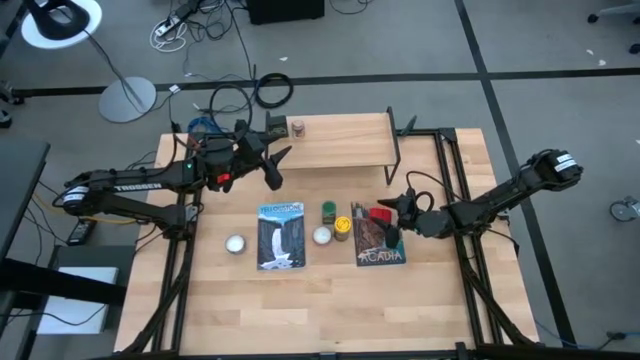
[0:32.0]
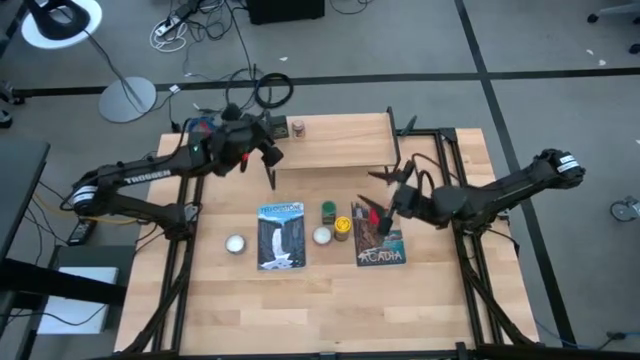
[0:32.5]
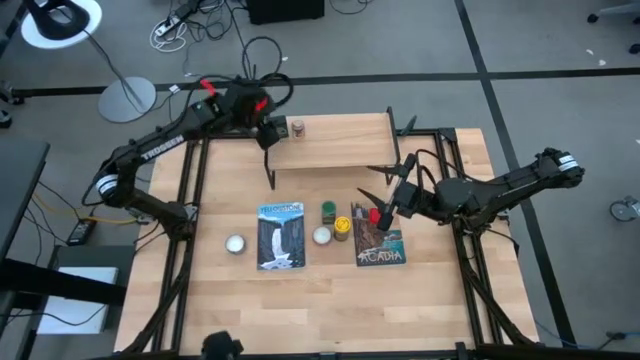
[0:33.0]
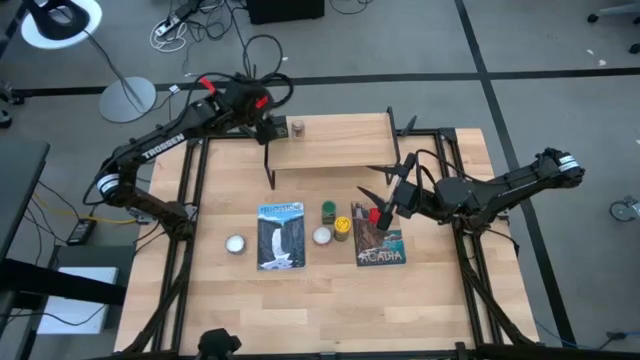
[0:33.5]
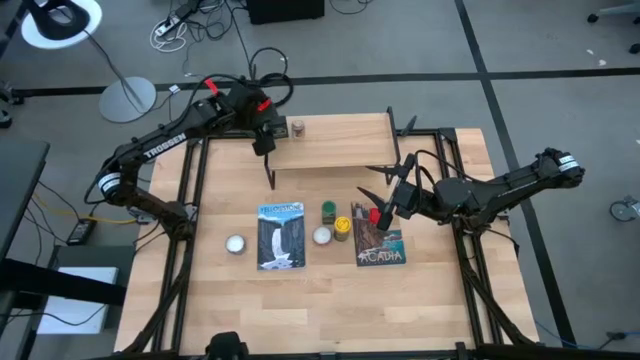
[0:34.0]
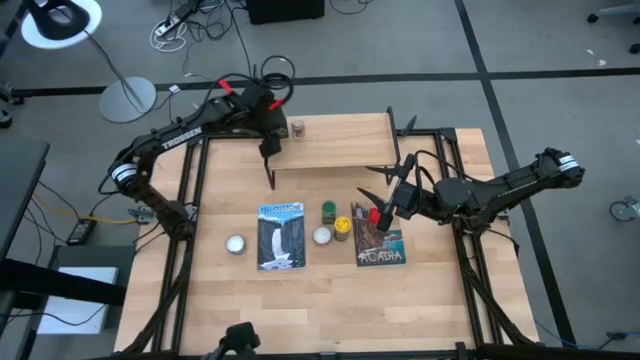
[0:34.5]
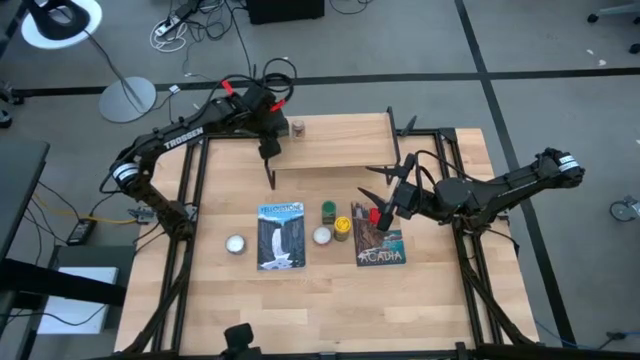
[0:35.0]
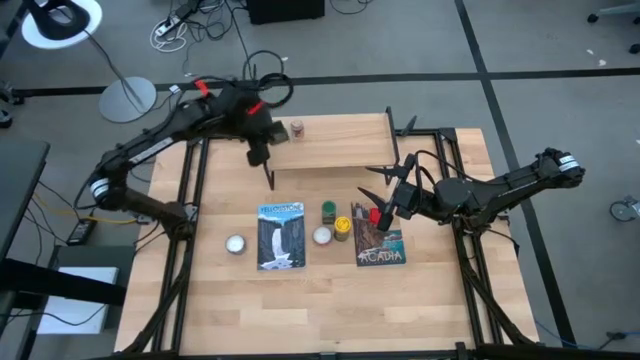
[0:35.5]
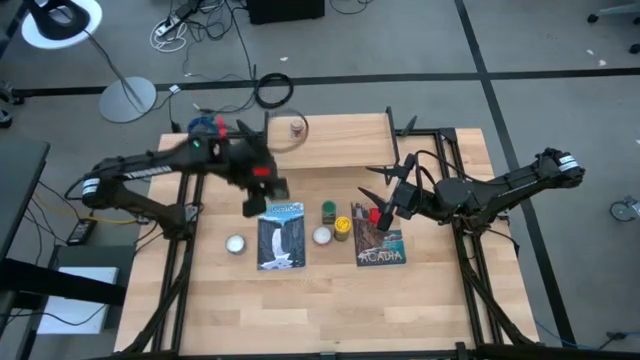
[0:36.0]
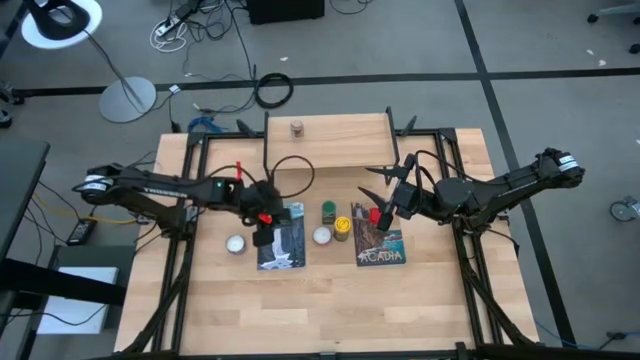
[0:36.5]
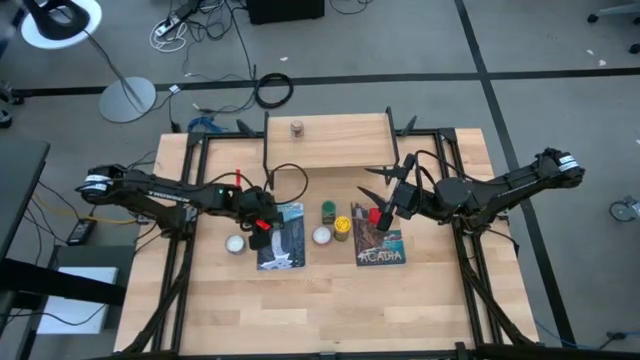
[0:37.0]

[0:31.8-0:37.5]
Task: Shelf spices
Remove the black spice from the shelf

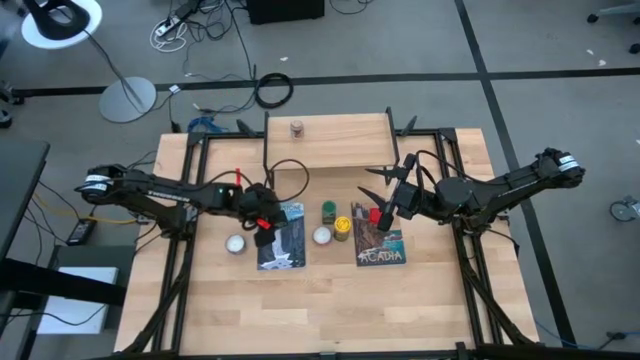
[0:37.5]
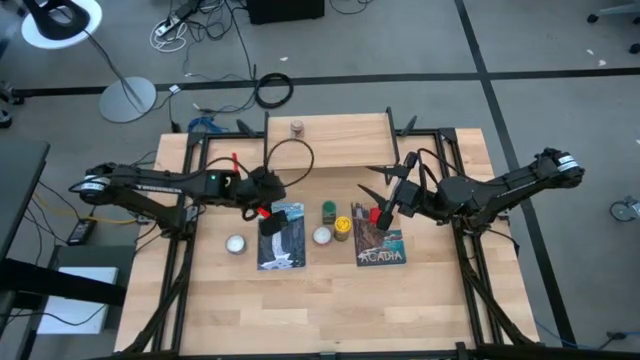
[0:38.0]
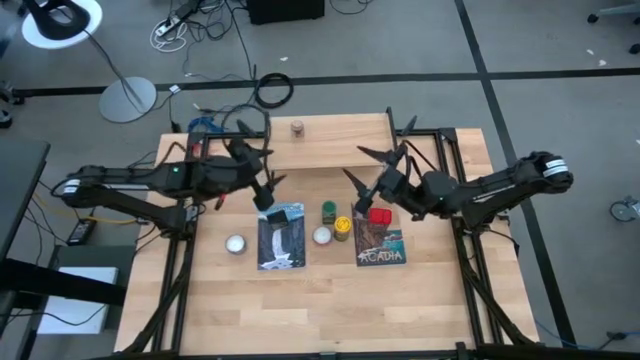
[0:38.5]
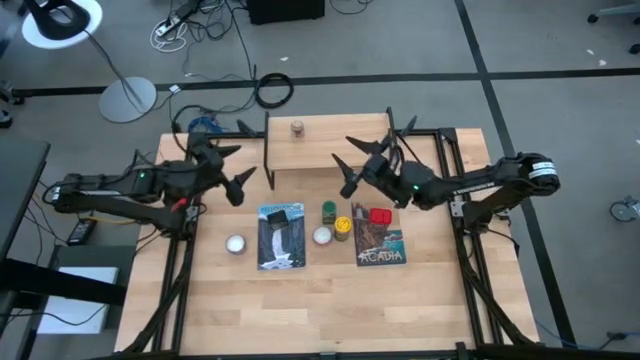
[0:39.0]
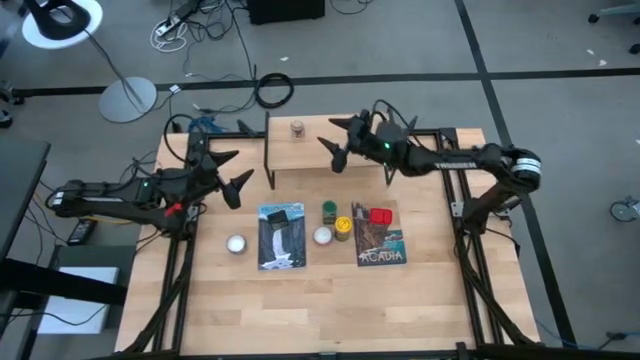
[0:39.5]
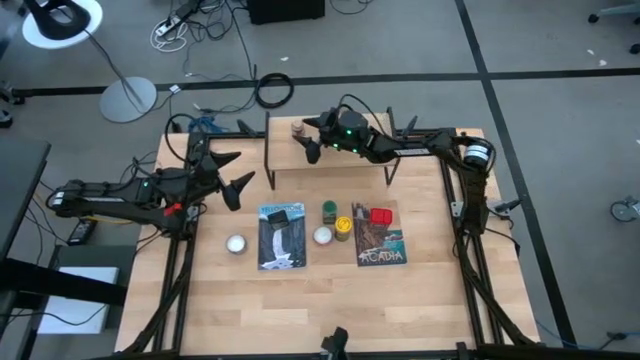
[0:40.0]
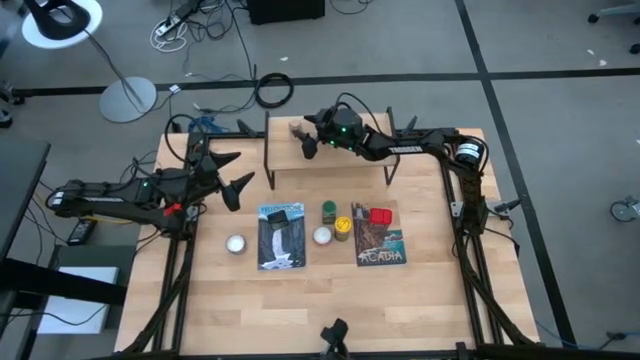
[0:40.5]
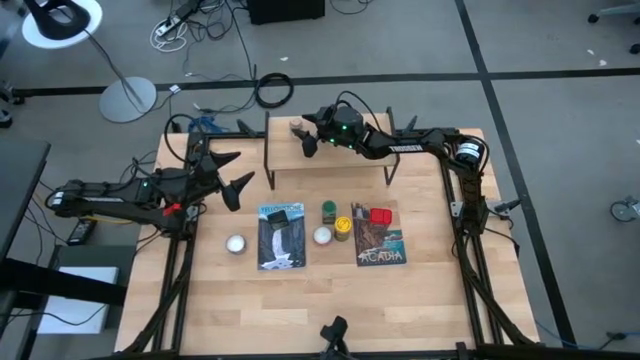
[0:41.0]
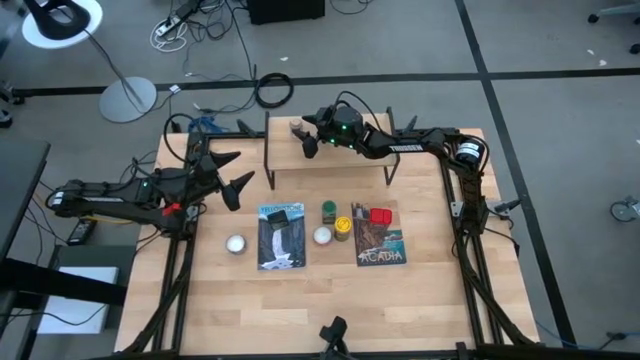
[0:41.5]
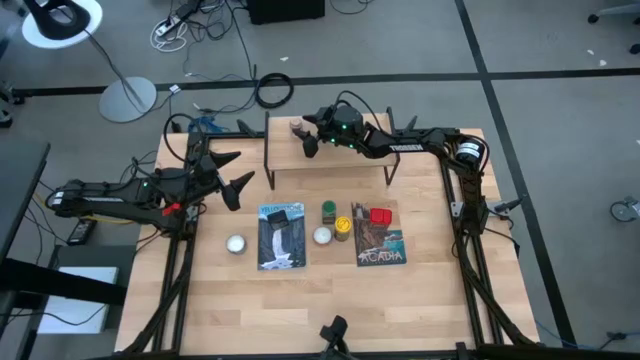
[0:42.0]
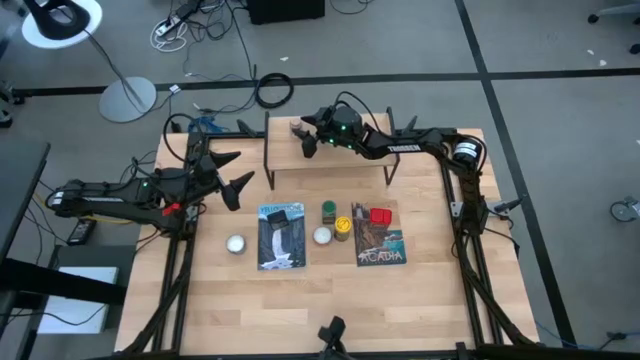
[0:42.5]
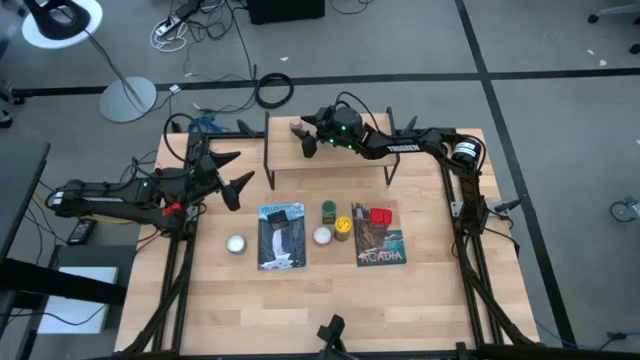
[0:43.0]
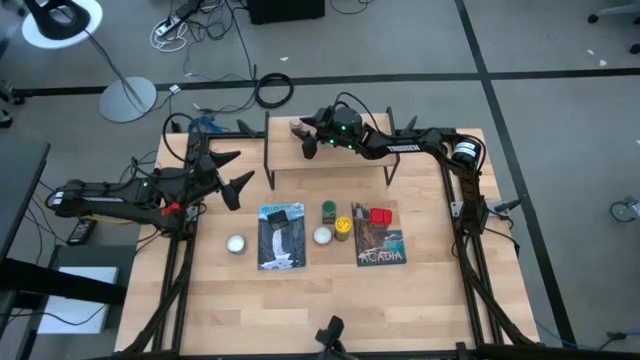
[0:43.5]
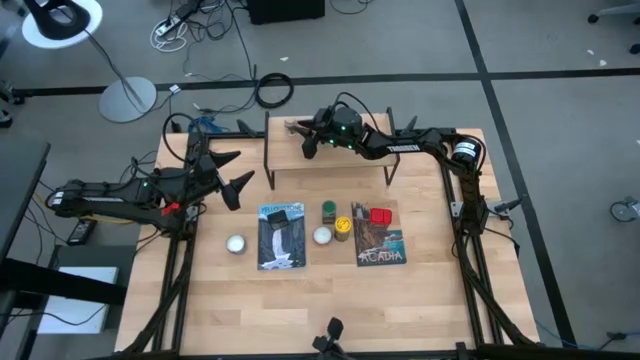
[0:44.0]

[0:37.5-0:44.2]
Remove the white transparent spice from the shelf

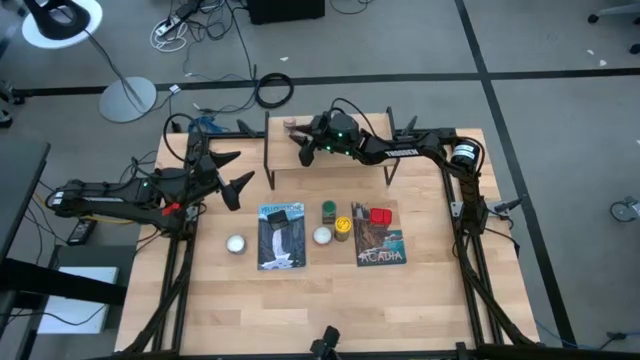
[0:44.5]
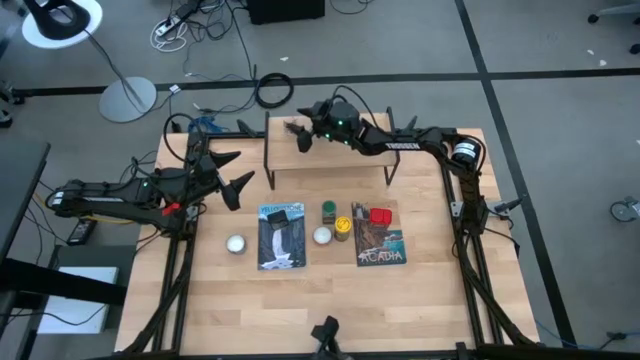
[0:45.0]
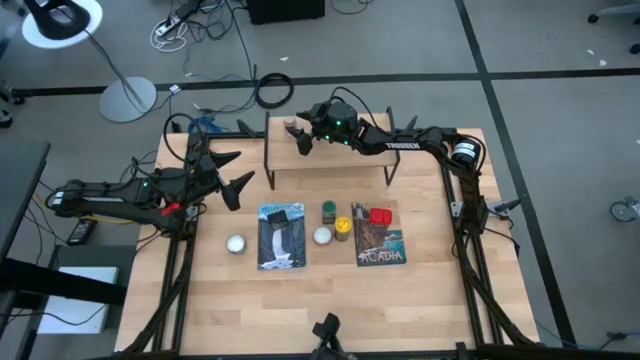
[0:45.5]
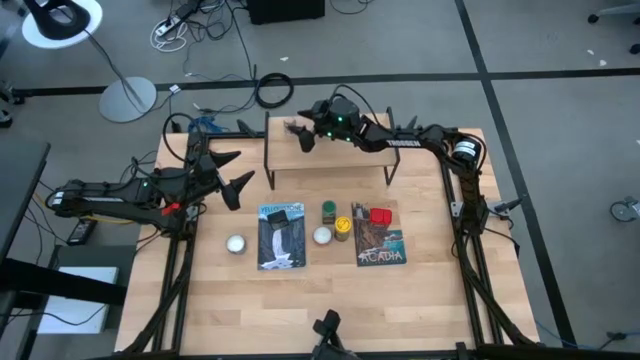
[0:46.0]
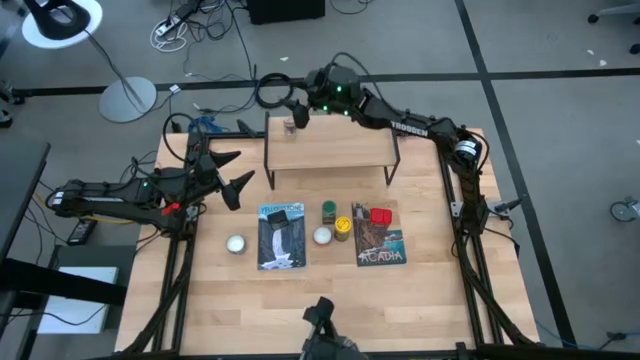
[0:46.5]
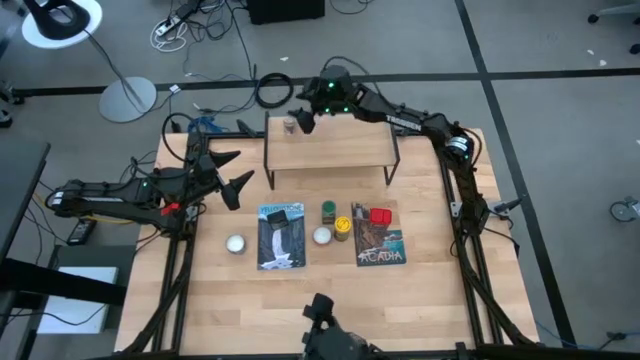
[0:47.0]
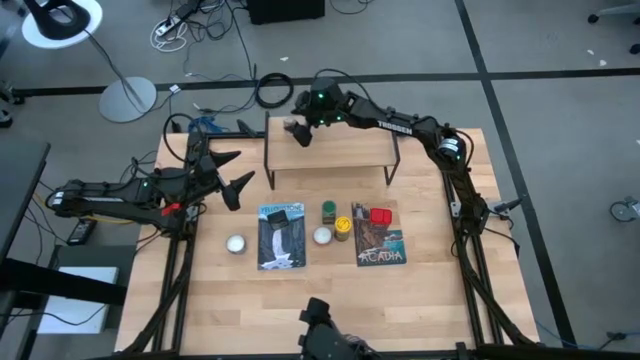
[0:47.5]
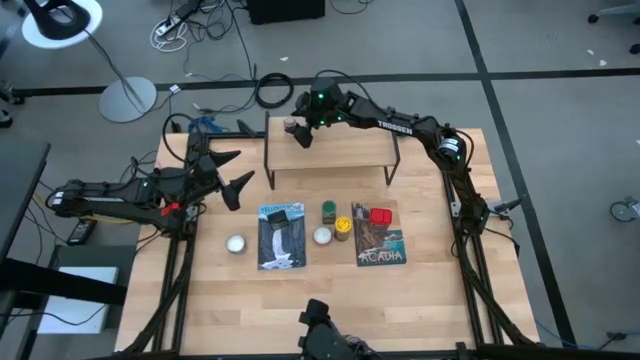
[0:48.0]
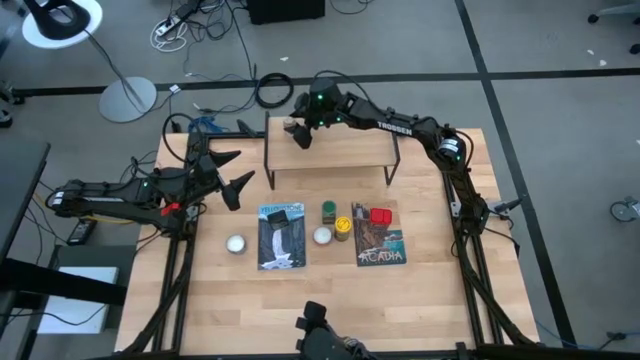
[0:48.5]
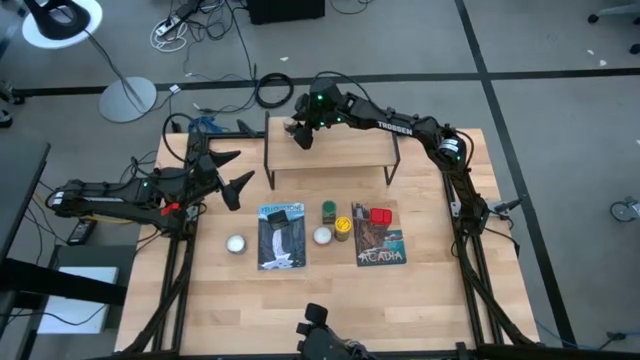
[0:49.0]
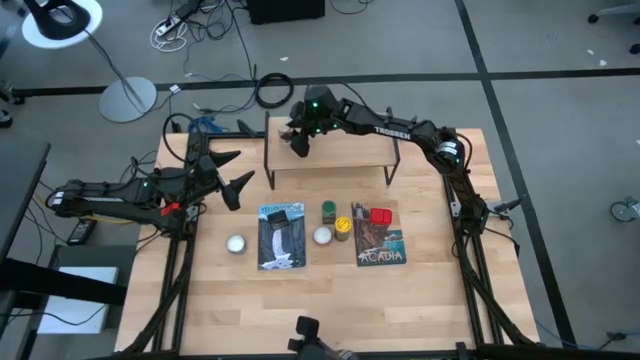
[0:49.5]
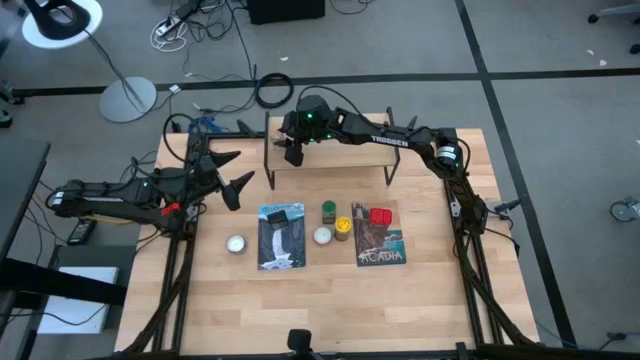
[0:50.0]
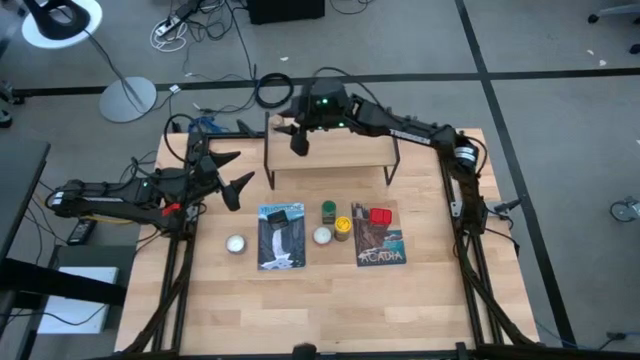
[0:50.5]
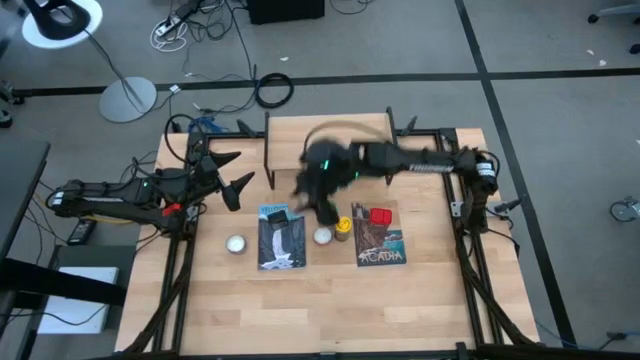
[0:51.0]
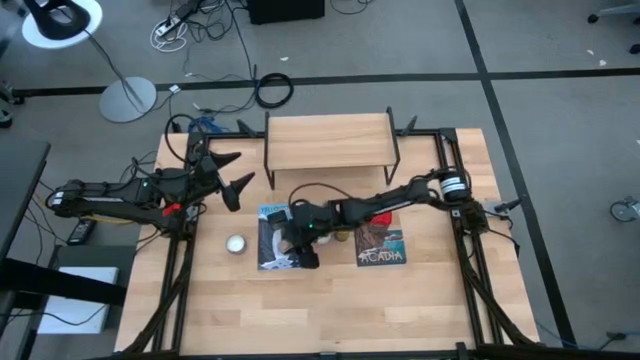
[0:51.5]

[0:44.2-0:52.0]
Remove the white transparent spice from the shelf
